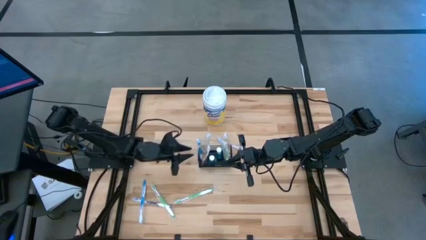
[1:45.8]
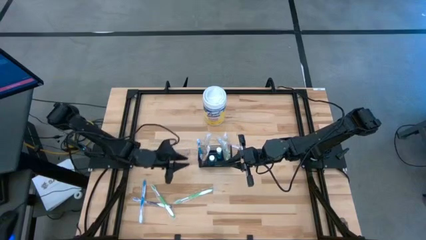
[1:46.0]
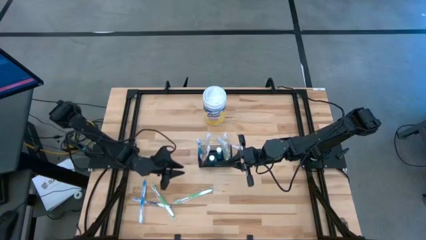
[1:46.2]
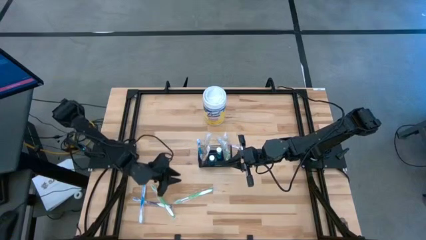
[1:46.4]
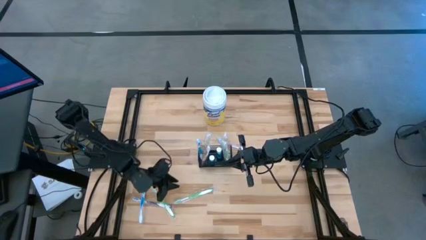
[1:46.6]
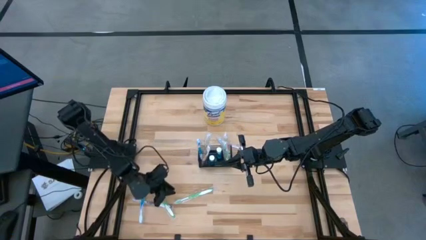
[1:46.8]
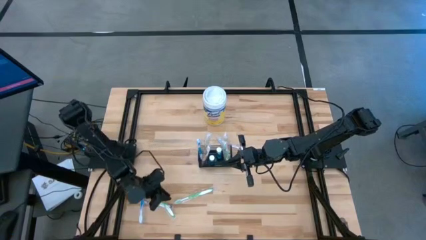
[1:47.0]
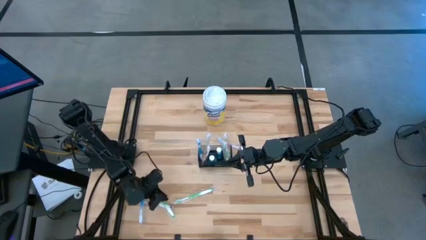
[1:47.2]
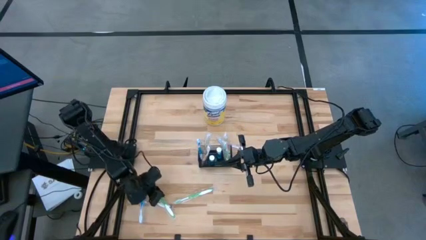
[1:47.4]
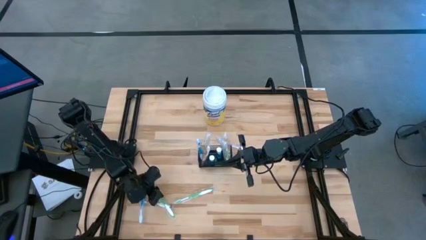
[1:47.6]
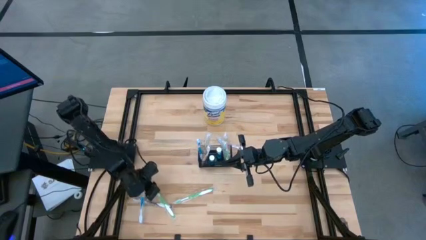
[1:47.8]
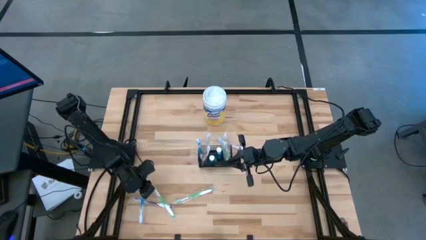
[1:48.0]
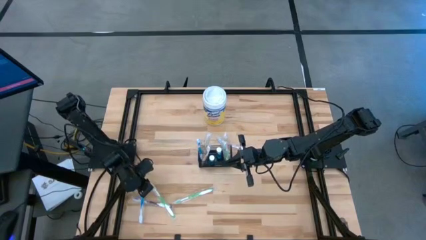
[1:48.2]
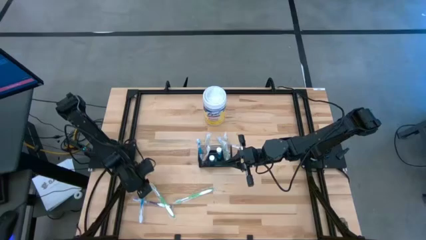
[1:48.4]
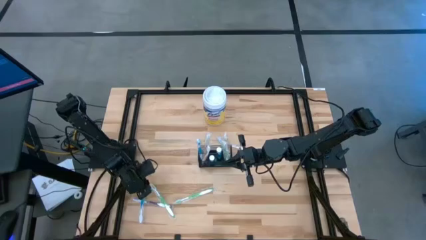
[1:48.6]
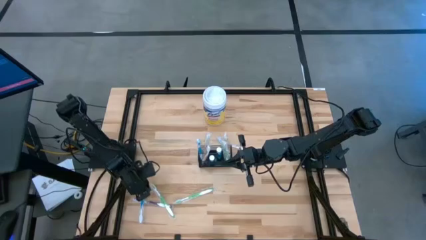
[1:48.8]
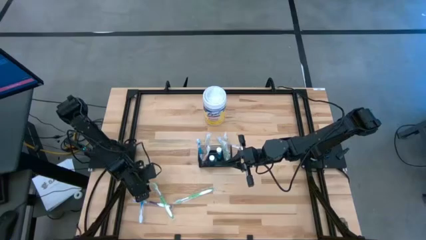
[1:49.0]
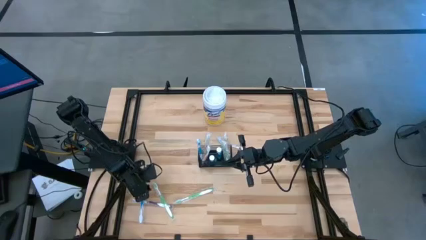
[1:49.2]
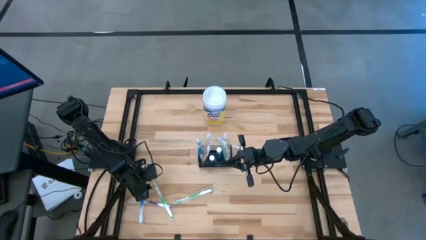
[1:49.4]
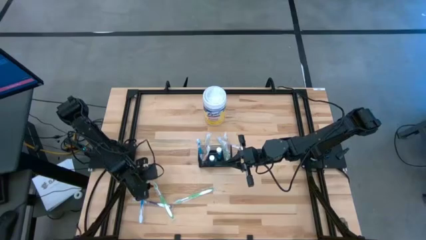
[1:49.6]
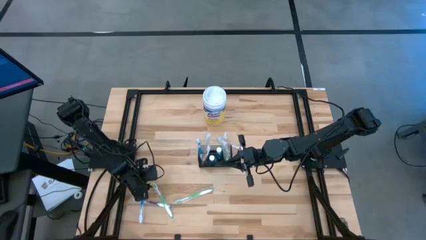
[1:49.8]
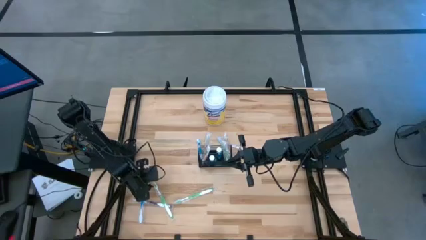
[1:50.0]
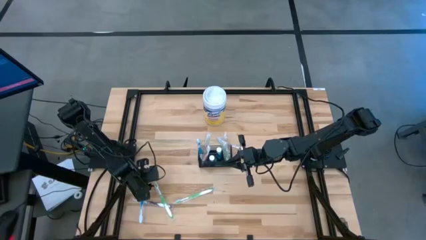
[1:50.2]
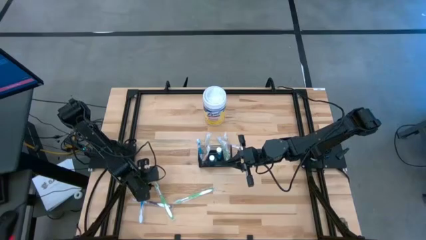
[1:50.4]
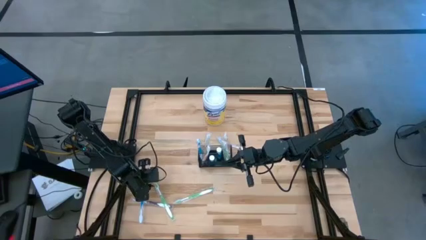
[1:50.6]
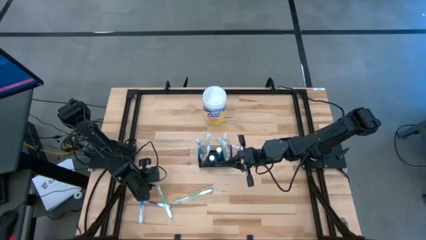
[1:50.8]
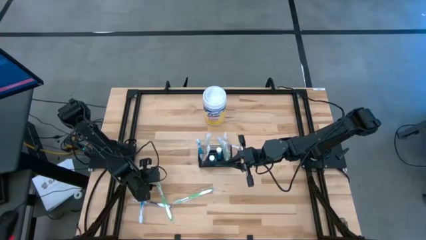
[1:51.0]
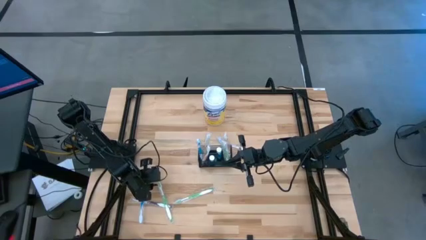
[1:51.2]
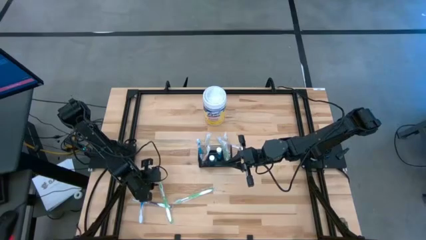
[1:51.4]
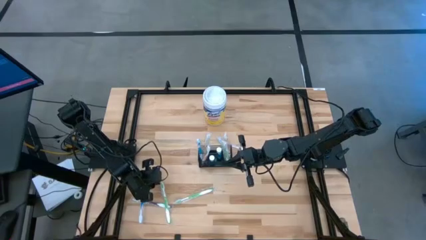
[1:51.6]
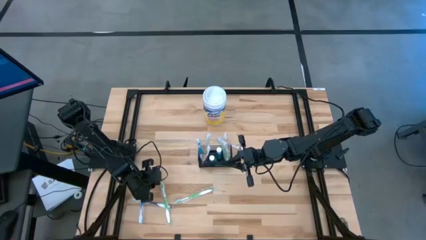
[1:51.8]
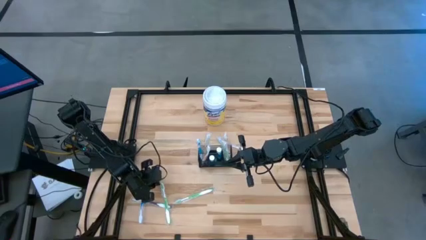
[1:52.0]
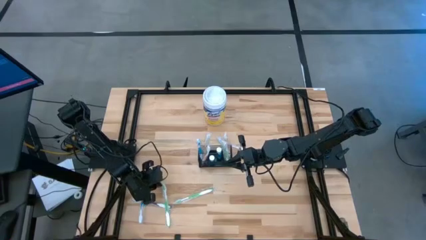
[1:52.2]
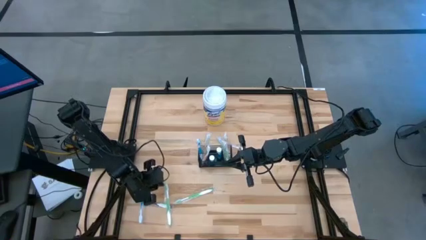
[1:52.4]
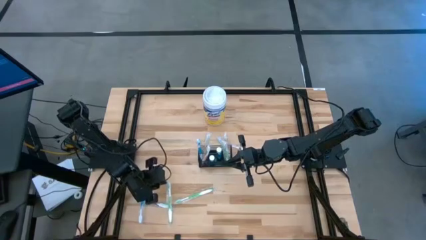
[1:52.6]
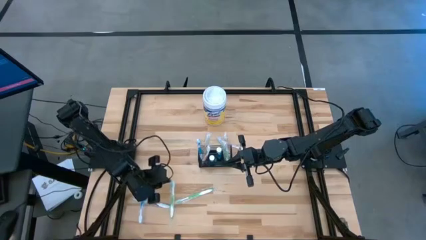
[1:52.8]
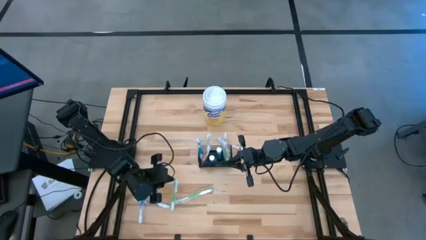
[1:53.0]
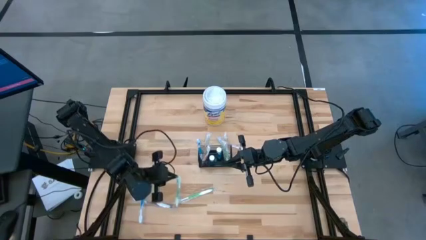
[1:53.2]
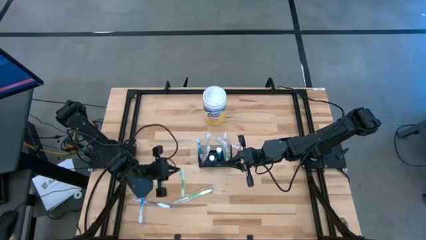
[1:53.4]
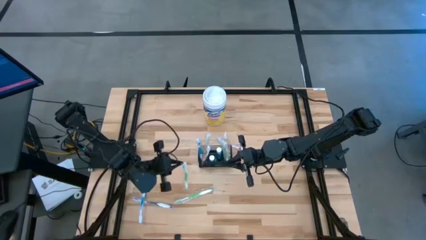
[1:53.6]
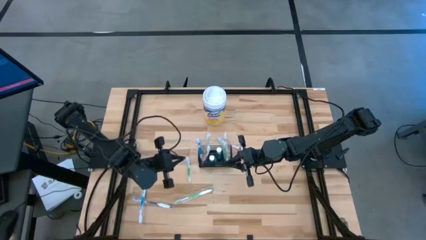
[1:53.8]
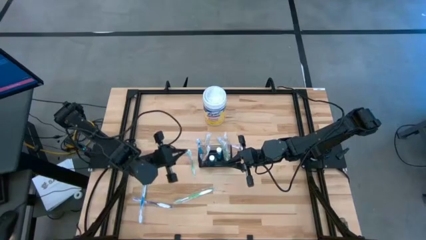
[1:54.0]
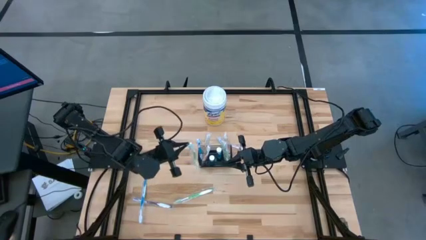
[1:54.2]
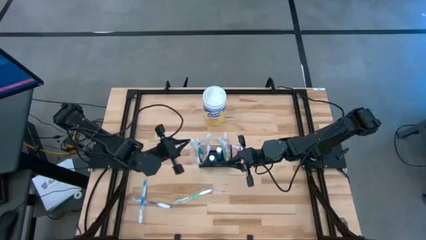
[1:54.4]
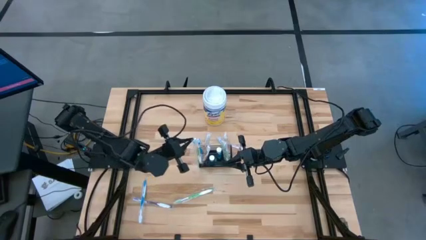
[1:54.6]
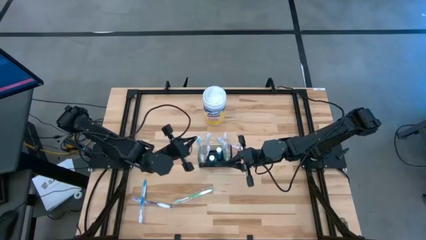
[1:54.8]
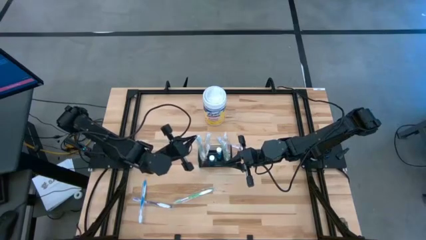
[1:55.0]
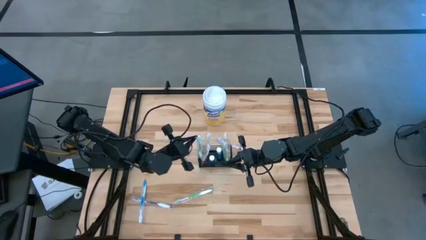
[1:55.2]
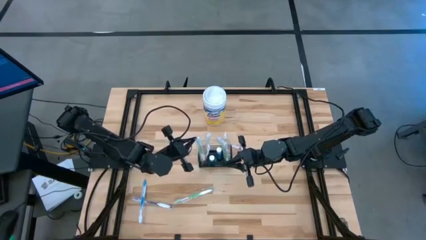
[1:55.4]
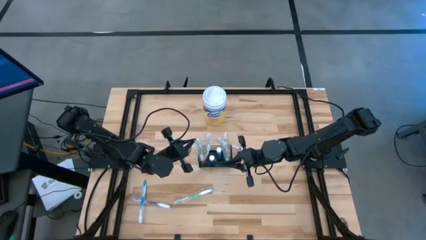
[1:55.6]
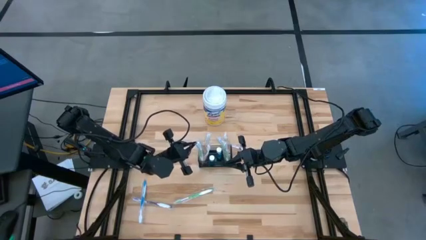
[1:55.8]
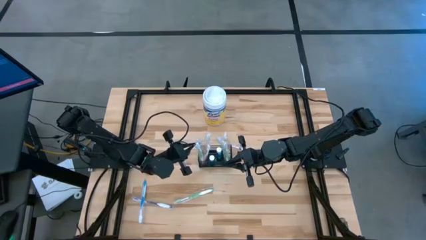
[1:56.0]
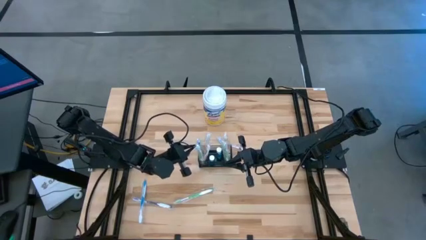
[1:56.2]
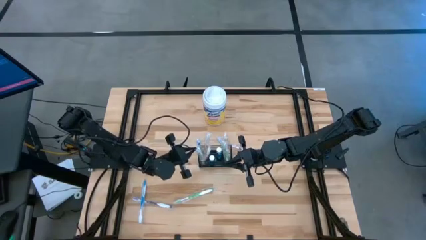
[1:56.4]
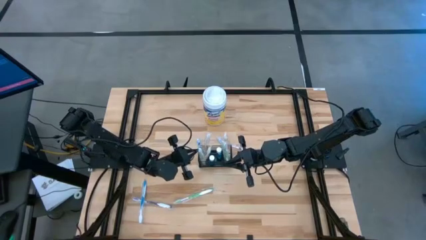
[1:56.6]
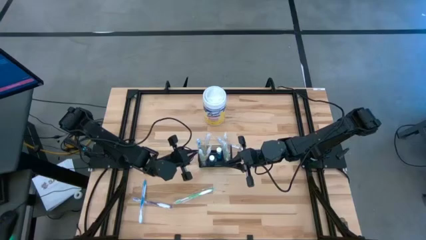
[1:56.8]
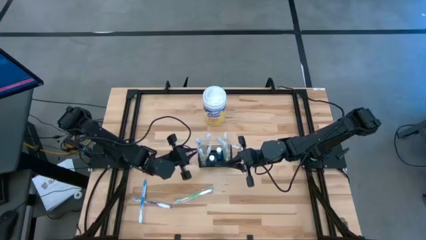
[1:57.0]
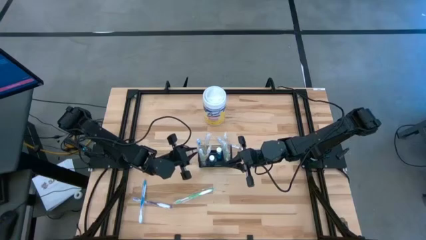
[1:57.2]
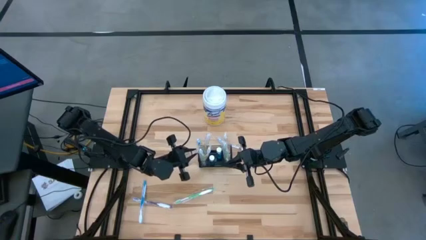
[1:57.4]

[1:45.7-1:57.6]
Task: Pick & Place toothbrushing station
Put the left green toothbrush into the mesh organizer

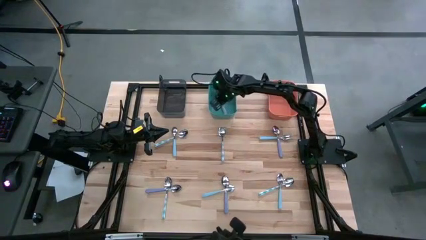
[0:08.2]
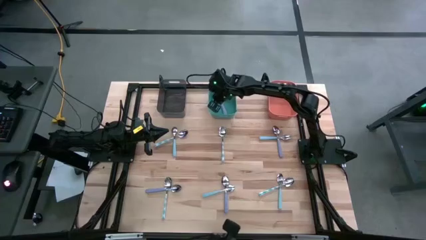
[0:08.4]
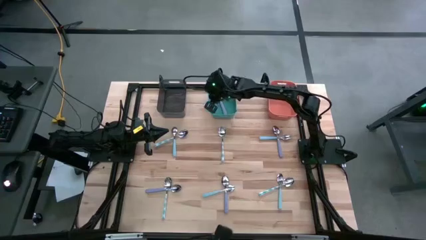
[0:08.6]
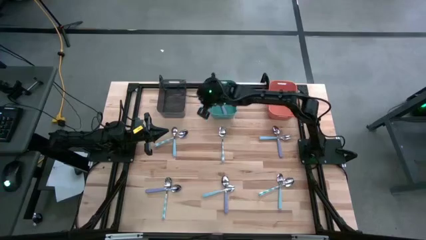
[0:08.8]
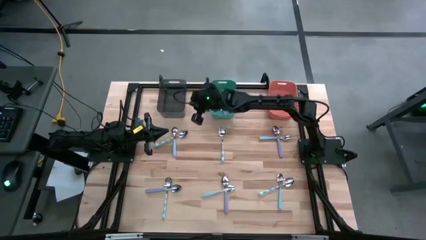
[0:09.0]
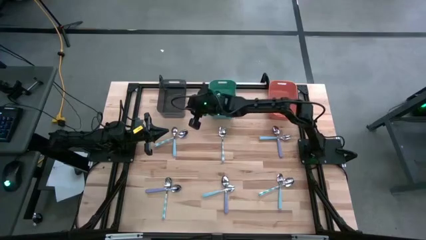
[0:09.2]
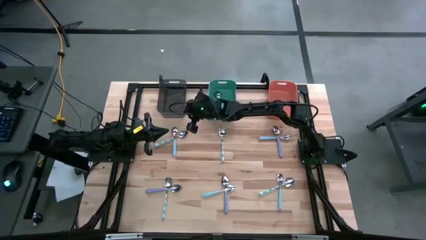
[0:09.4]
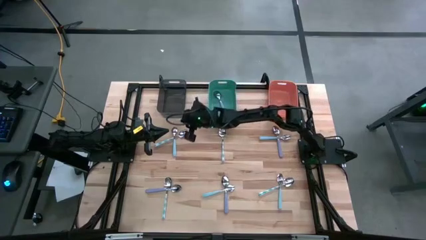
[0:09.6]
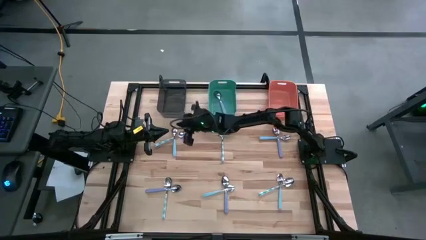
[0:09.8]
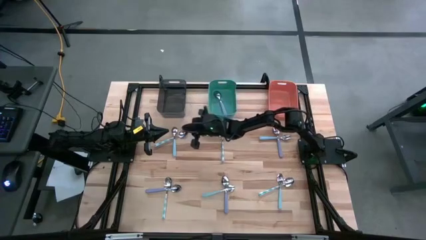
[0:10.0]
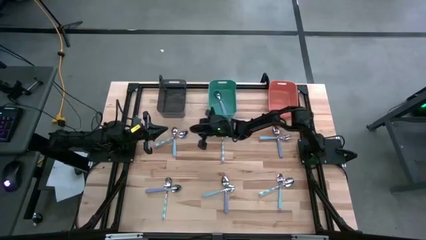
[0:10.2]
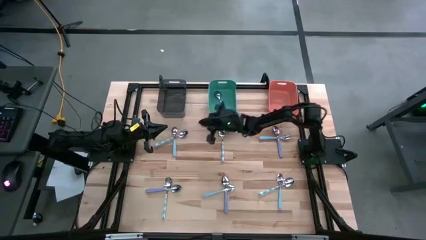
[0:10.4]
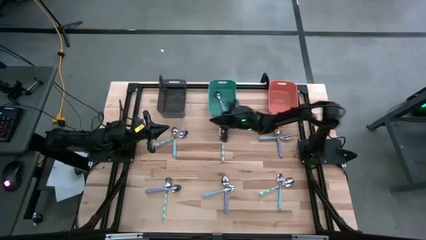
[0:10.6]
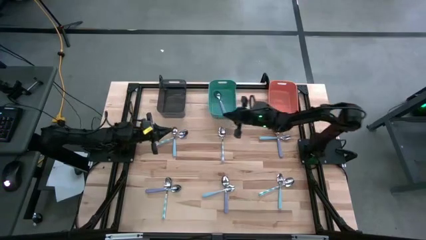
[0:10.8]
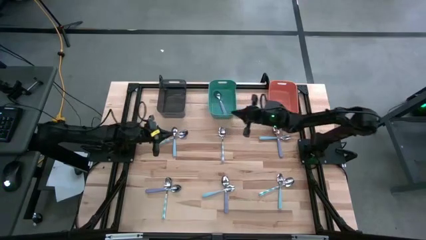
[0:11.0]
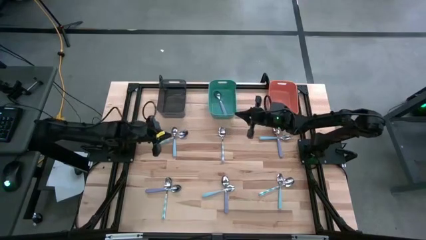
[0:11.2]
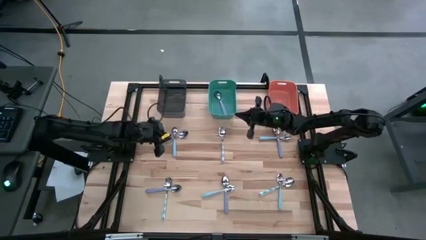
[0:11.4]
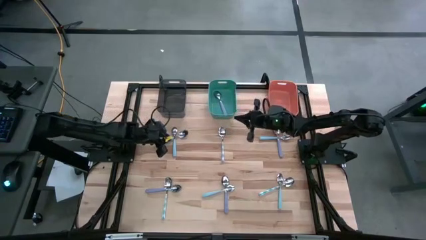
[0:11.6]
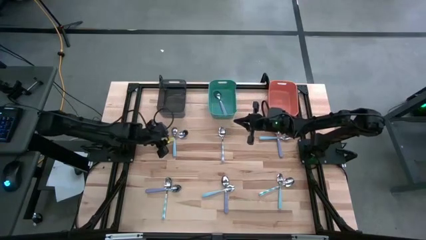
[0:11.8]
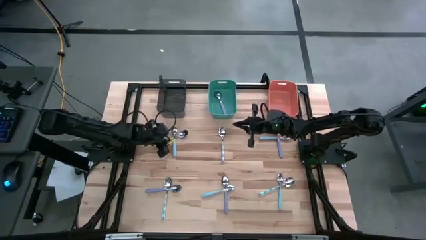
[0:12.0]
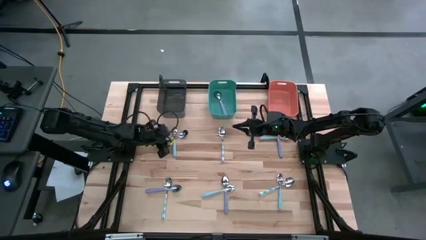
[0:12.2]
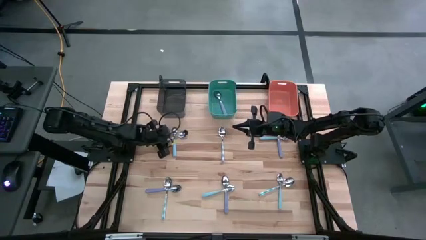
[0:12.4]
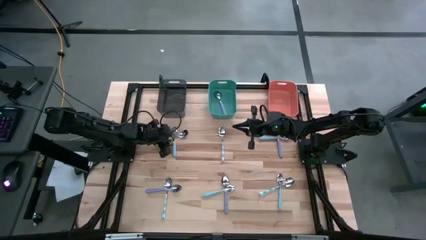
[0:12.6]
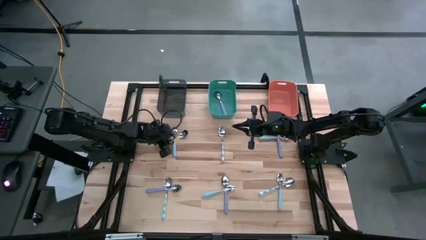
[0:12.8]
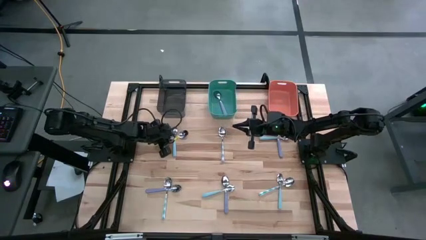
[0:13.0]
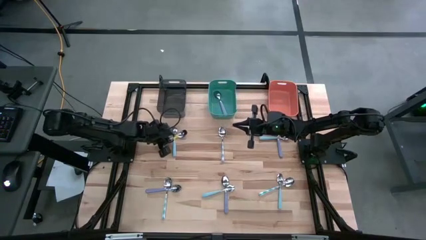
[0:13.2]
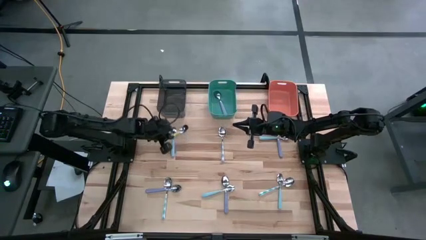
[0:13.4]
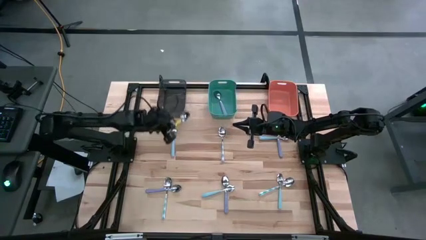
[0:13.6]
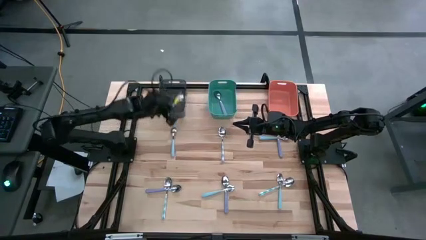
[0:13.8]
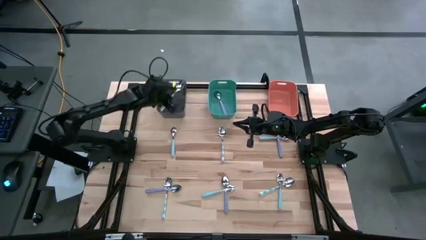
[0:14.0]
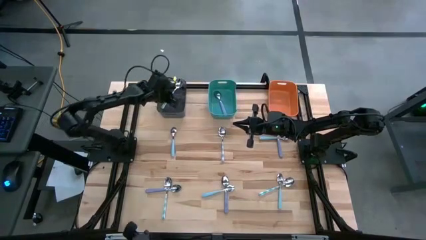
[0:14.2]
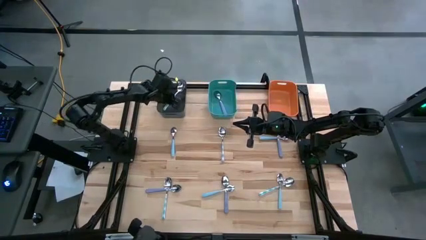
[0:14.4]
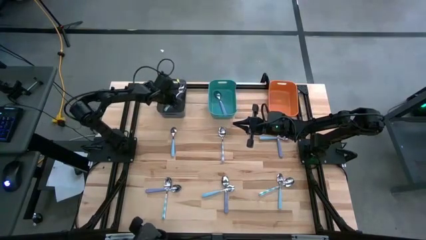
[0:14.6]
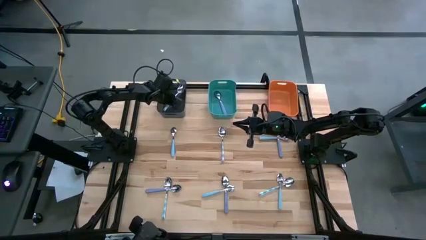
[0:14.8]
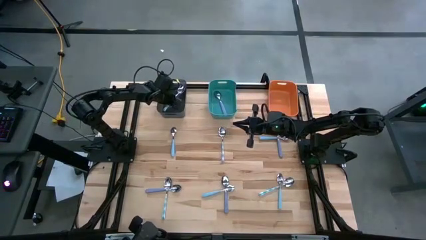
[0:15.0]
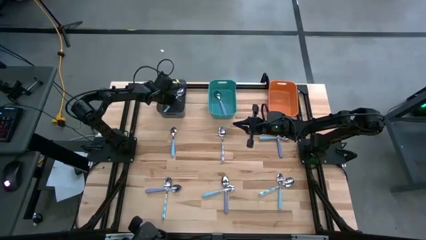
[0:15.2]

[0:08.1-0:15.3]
Task: Sort silverware by color (type)
Put the top left white spoon into the black bin
